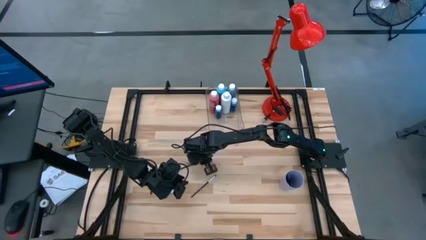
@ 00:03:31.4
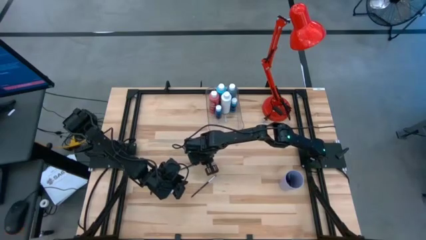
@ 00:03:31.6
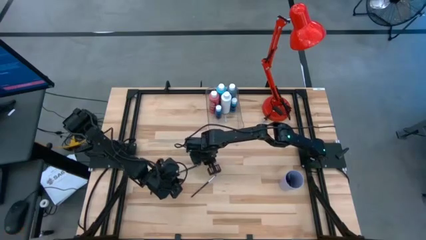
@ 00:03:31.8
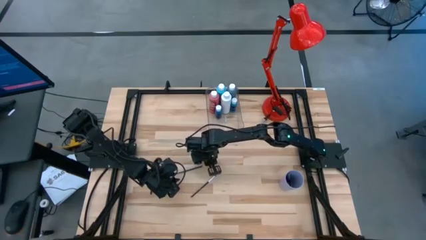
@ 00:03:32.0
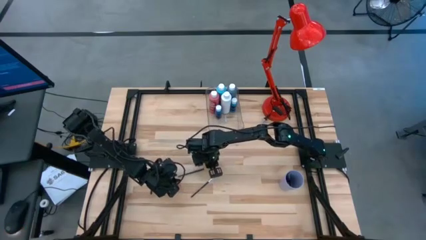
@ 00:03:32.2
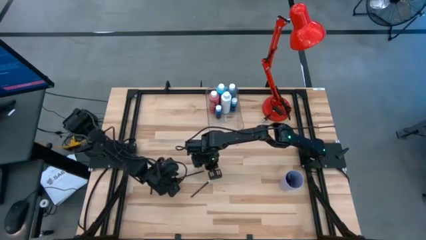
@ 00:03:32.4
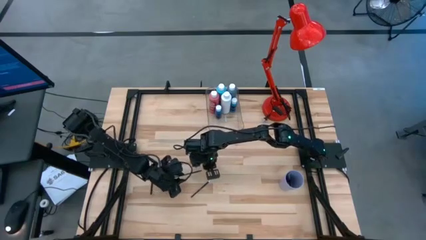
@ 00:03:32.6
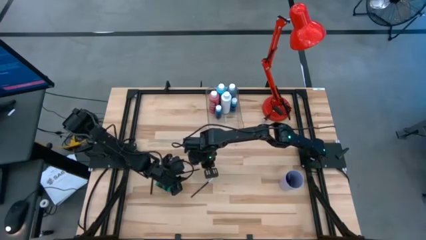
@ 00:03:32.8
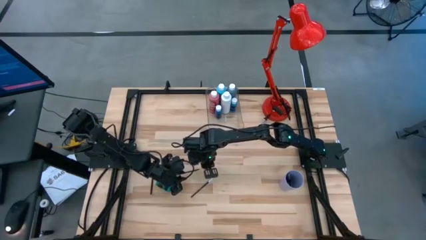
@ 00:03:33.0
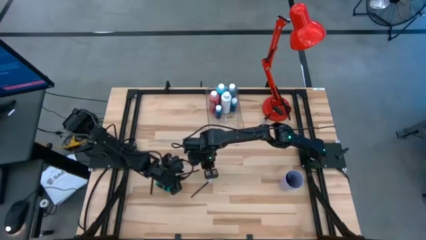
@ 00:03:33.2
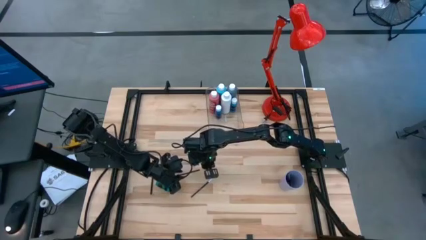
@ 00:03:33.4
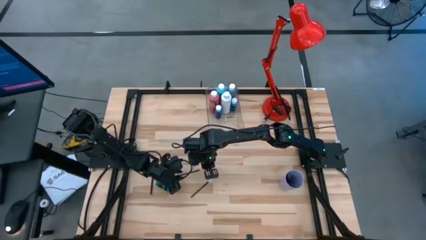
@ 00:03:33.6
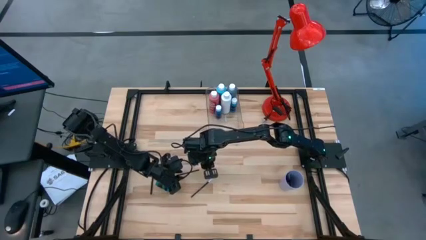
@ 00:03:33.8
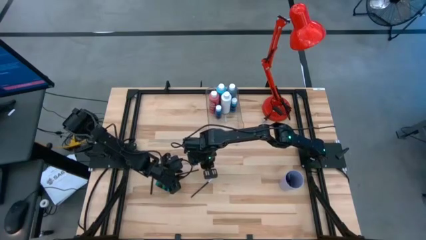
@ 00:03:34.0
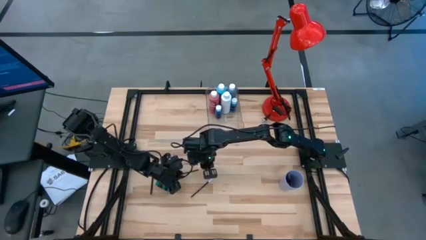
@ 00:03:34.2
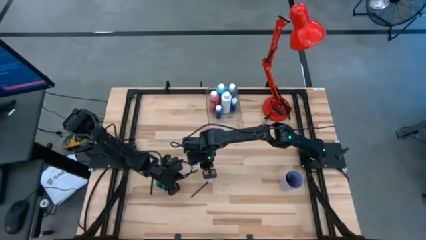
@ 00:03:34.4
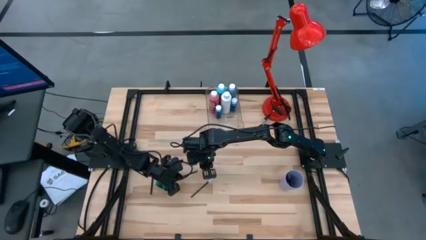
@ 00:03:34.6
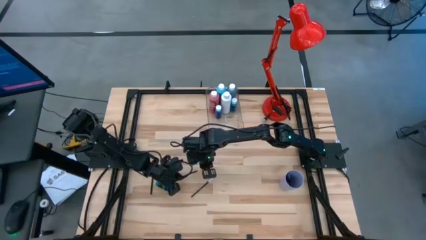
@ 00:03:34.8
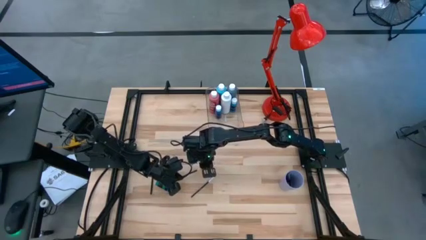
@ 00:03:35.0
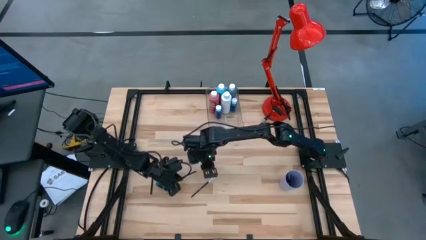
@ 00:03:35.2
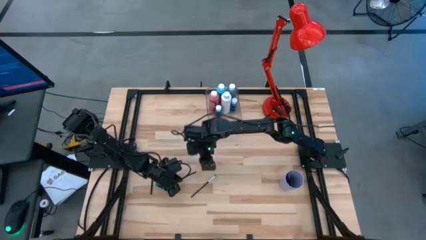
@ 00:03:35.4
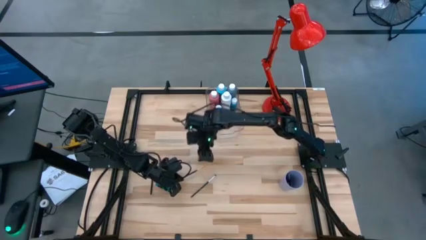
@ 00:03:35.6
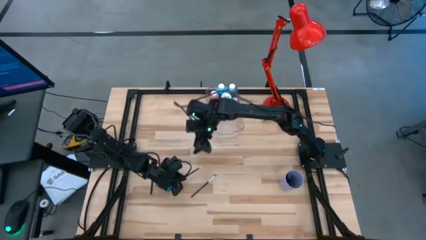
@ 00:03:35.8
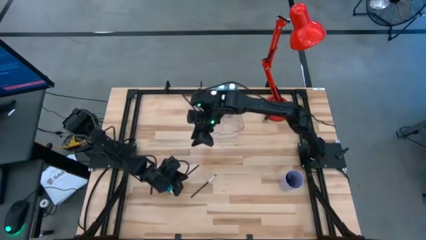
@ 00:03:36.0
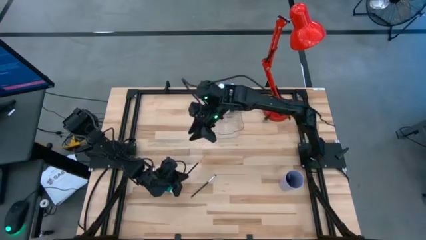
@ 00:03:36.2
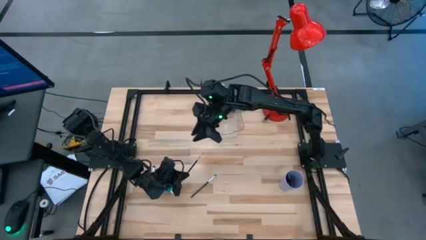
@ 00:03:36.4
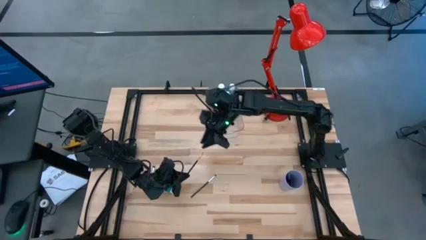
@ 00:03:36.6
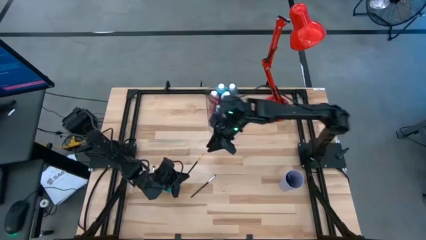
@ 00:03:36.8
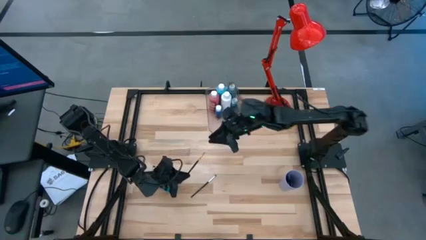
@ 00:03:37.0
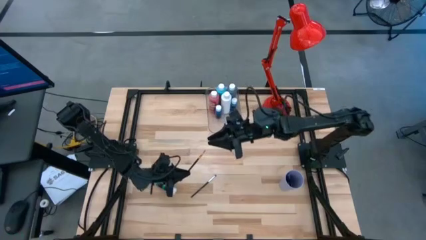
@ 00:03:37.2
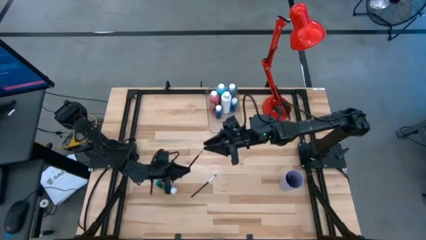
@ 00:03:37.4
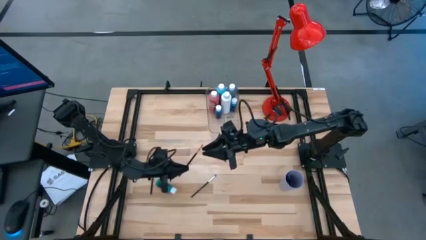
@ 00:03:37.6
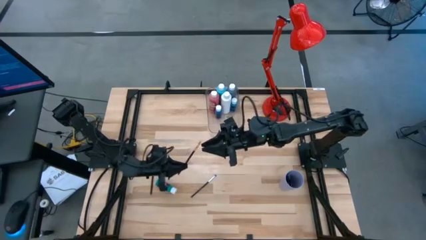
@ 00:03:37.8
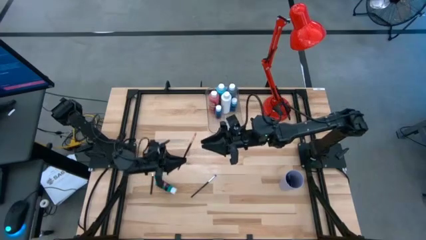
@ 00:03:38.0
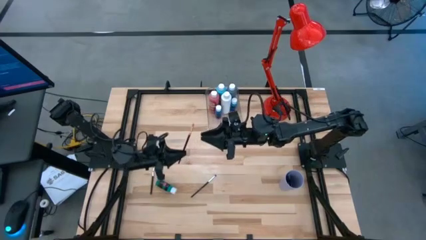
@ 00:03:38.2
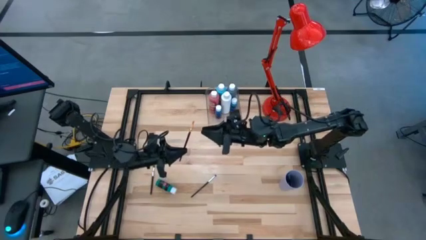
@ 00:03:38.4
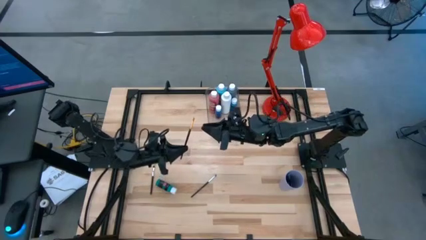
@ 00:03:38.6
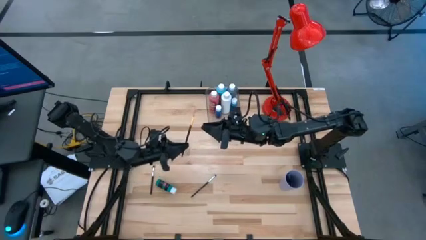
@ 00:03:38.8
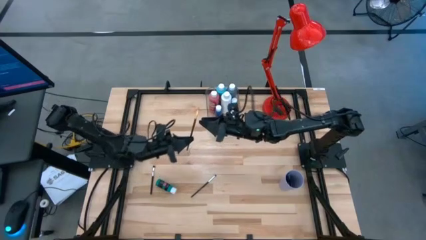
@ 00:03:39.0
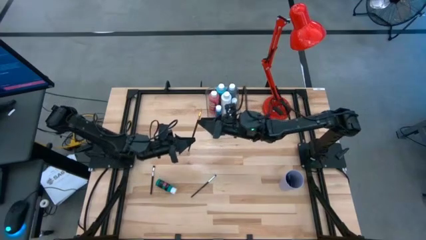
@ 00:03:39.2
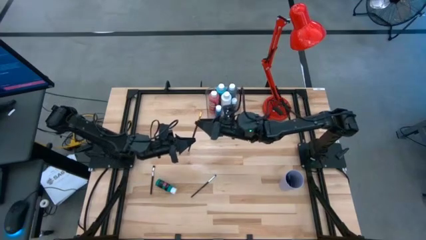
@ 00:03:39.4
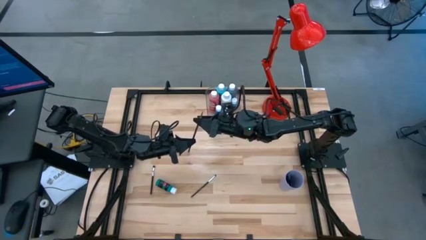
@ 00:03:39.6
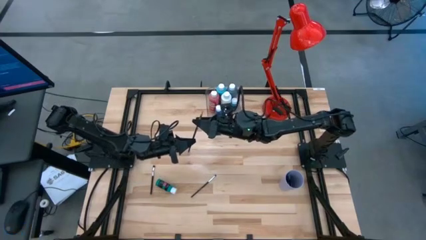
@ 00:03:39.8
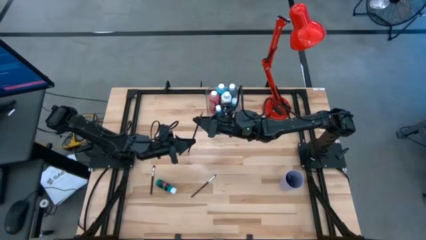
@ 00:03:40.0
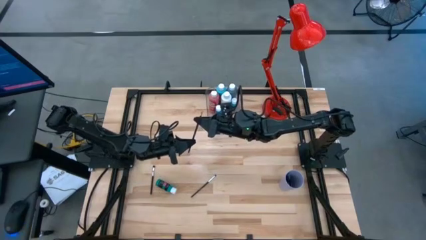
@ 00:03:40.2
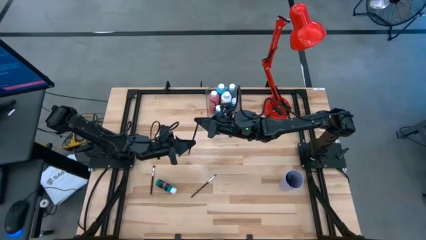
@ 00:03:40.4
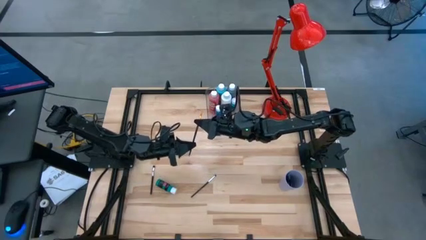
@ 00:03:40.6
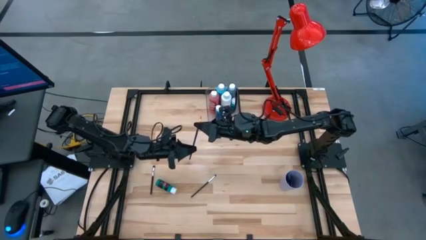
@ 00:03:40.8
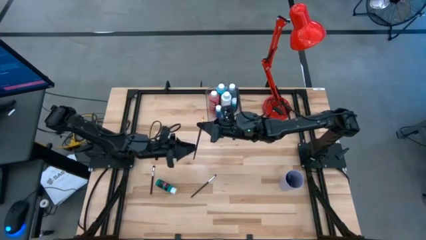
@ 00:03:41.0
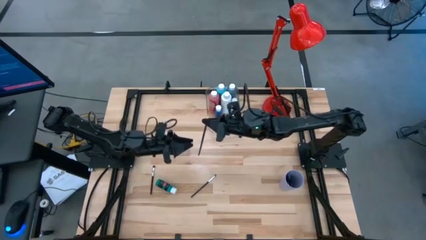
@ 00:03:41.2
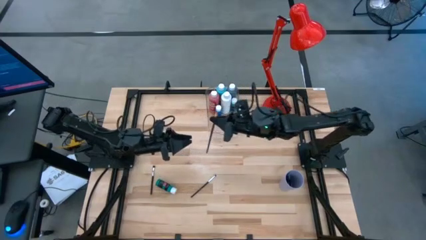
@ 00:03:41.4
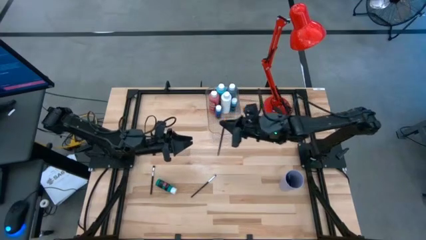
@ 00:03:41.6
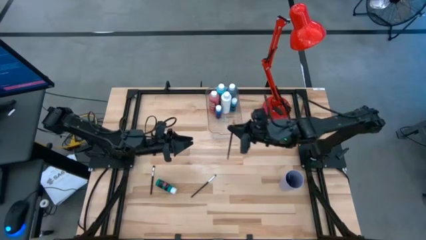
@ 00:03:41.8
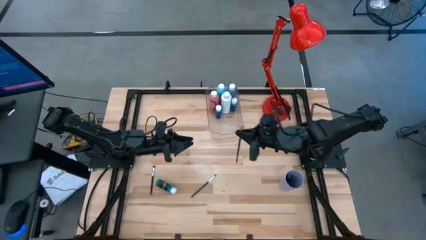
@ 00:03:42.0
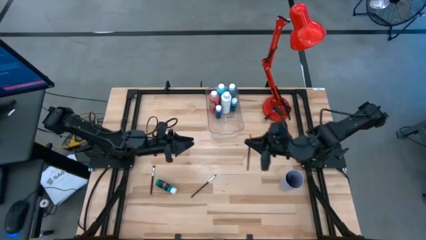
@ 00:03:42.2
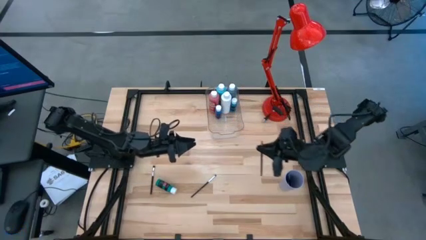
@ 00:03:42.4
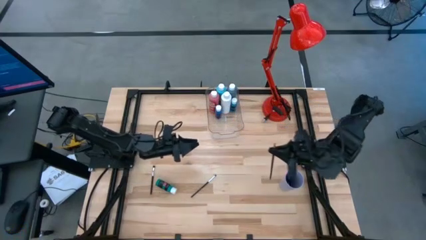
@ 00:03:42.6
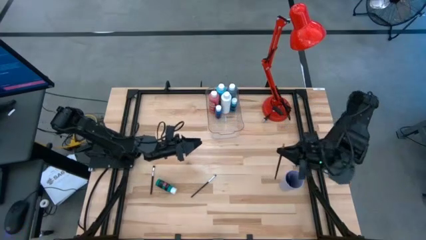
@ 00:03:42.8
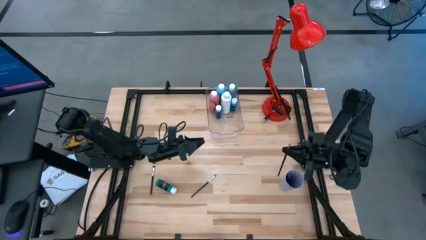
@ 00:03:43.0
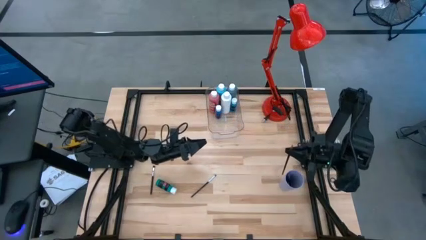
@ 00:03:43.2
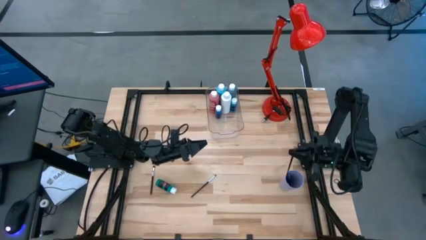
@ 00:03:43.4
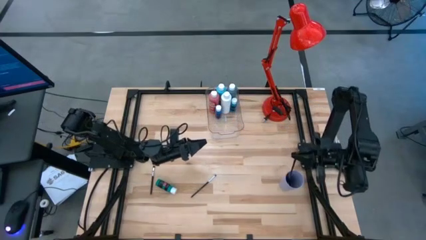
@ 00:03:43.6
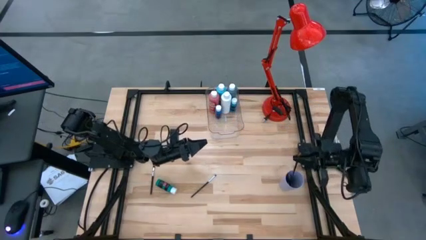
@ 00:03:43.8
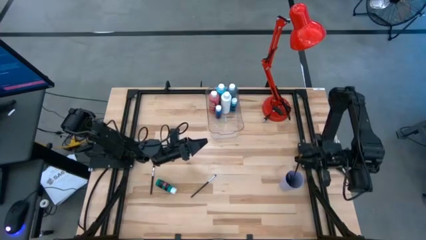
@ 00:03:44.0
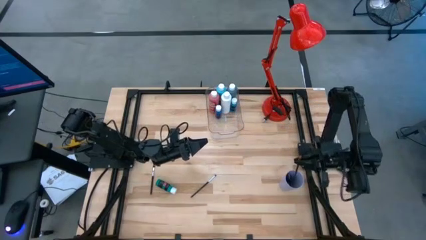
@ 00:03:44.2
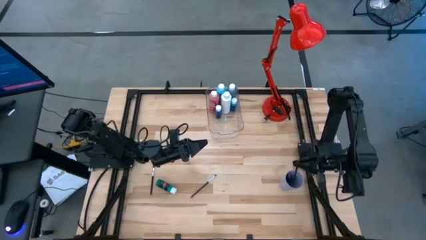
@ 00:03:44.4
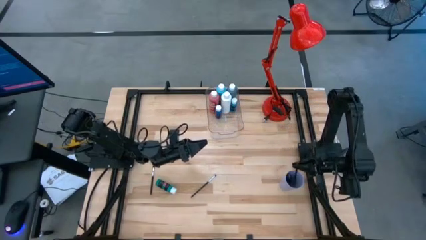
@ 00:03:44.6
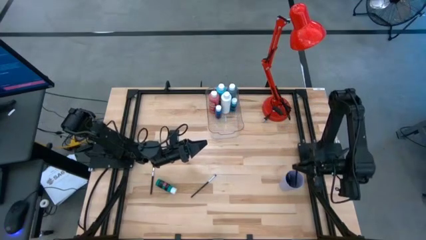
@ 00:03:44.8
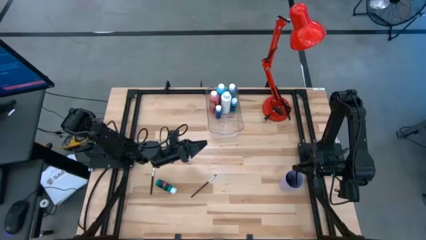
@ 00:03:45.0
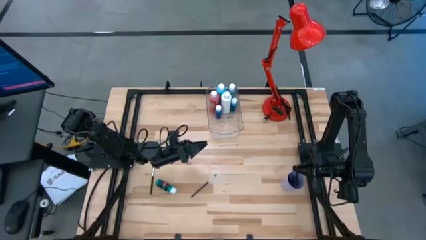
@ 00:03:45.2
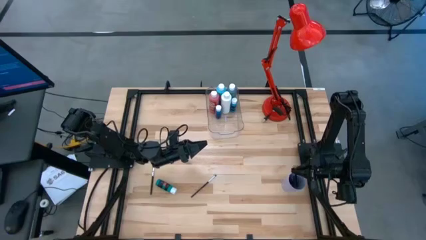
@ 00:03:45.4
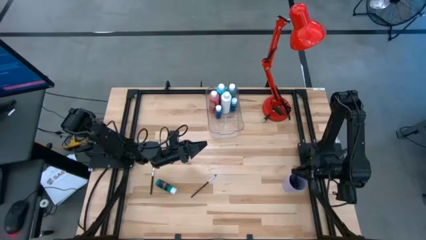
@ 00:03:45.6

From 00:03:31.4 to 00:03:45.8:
Task: Pick & Place Paint Supplies
Put the gold paintbrush into the purple cup
